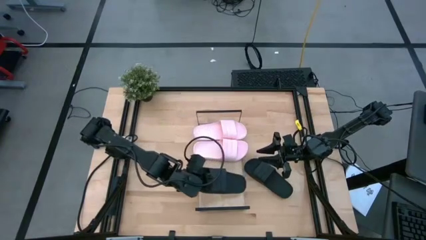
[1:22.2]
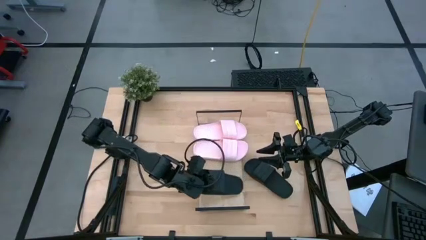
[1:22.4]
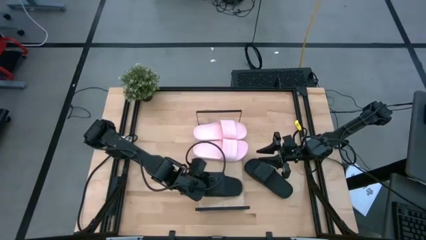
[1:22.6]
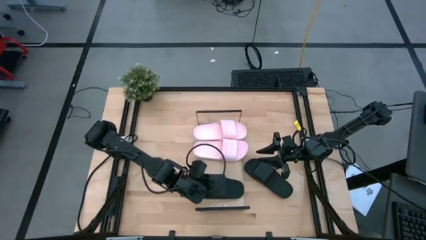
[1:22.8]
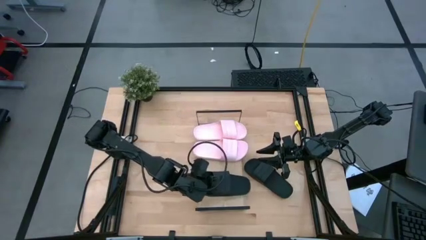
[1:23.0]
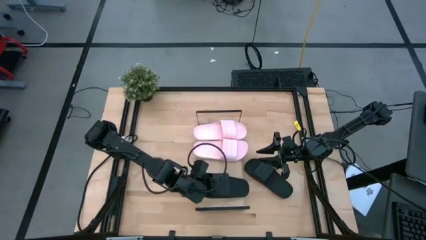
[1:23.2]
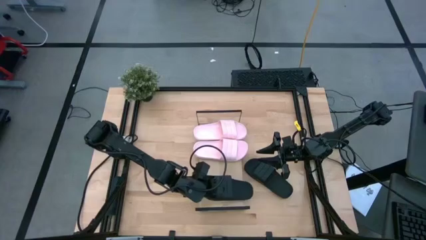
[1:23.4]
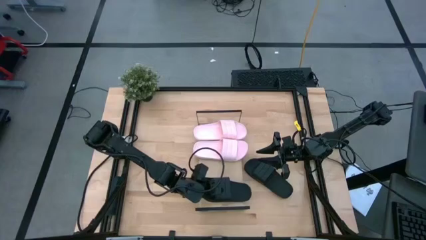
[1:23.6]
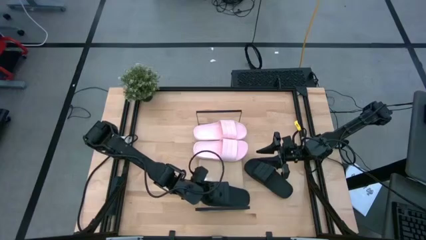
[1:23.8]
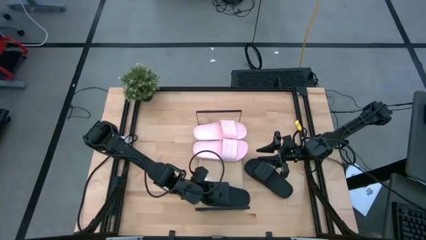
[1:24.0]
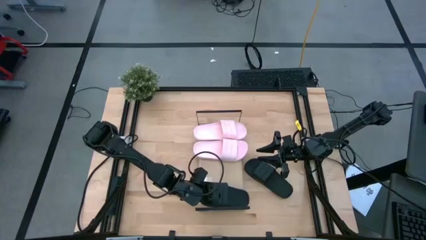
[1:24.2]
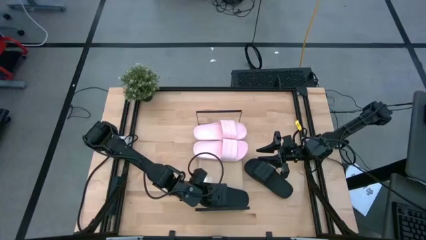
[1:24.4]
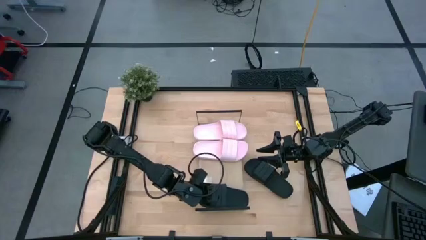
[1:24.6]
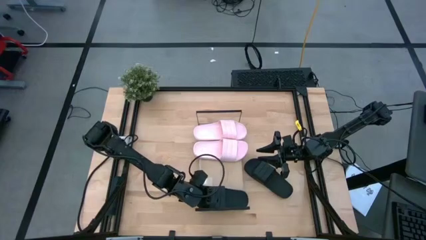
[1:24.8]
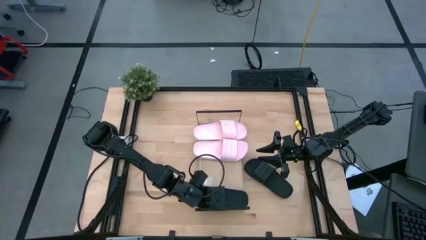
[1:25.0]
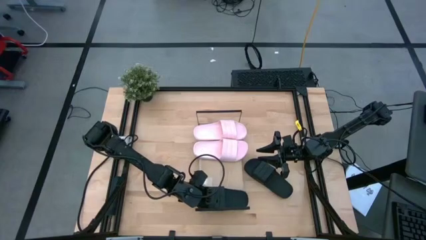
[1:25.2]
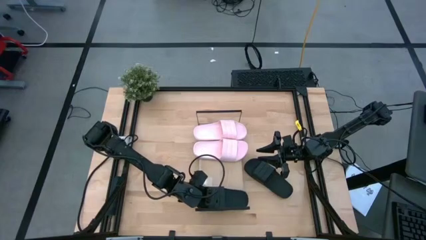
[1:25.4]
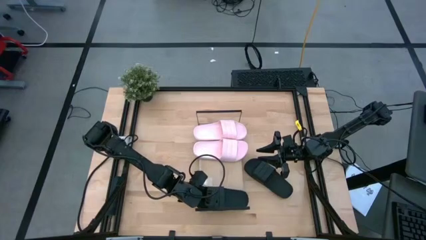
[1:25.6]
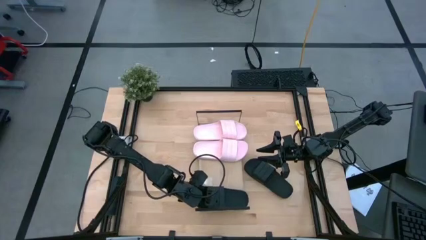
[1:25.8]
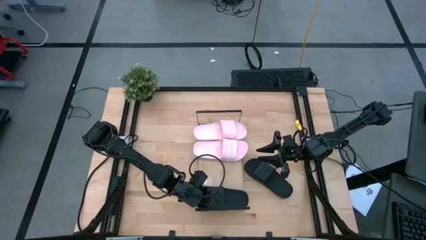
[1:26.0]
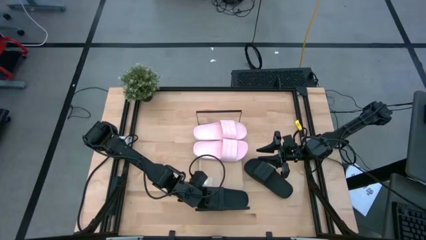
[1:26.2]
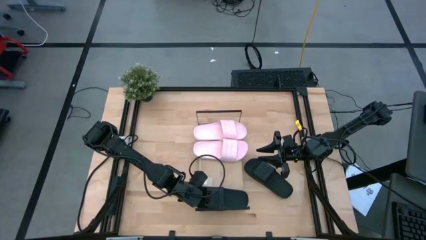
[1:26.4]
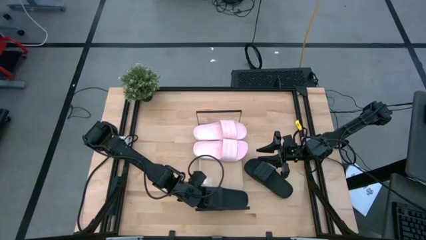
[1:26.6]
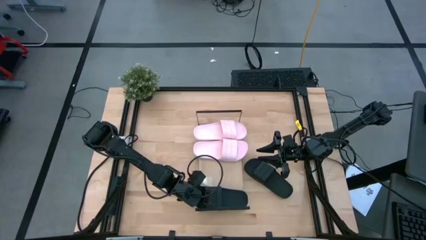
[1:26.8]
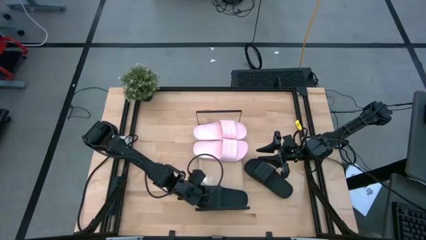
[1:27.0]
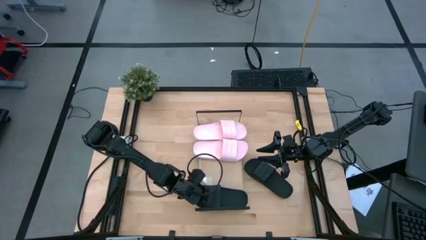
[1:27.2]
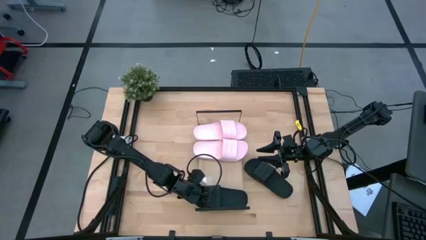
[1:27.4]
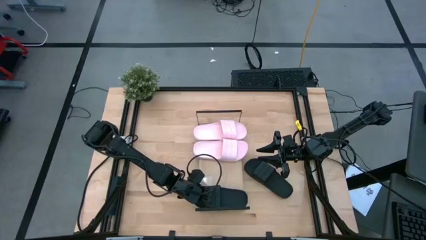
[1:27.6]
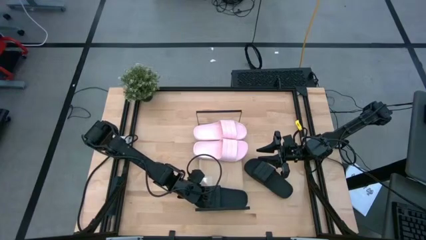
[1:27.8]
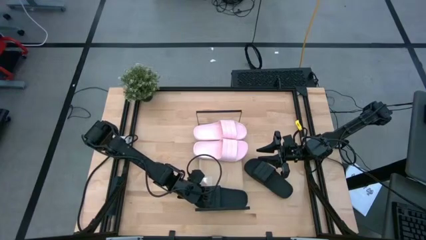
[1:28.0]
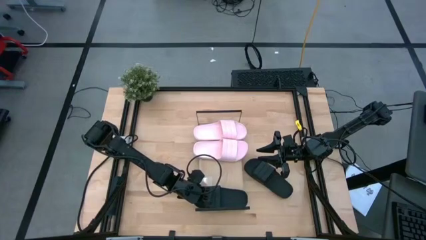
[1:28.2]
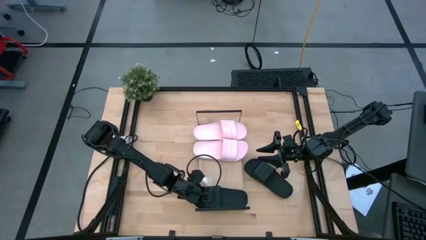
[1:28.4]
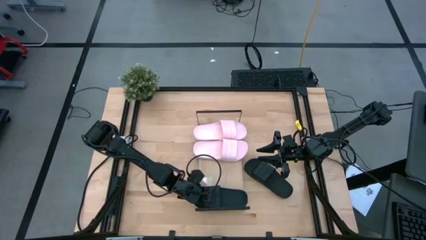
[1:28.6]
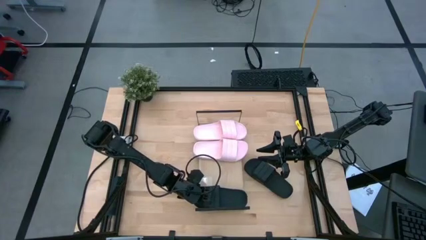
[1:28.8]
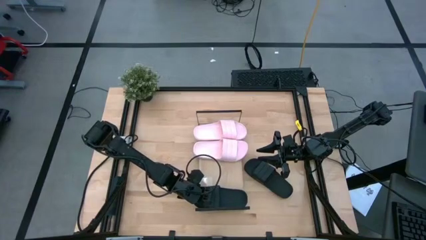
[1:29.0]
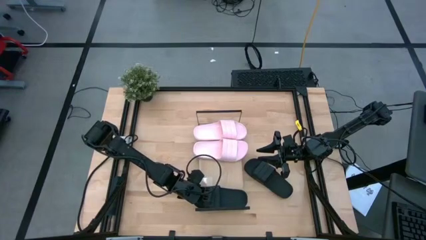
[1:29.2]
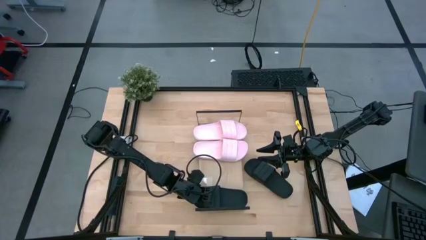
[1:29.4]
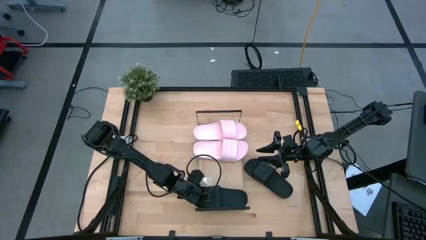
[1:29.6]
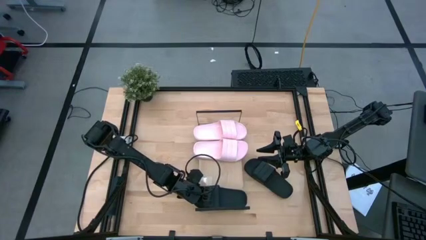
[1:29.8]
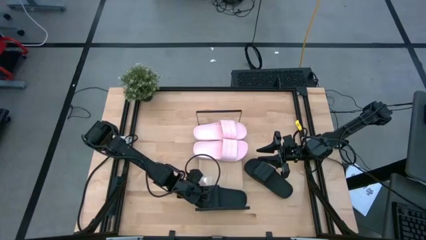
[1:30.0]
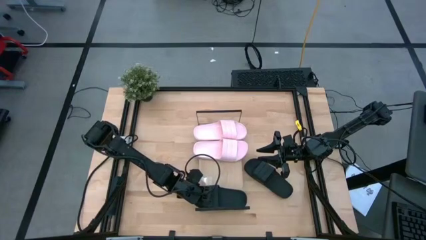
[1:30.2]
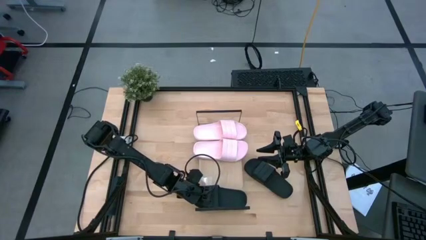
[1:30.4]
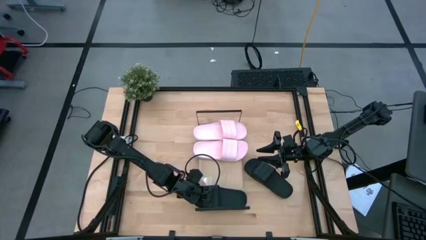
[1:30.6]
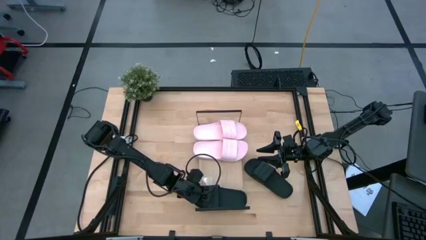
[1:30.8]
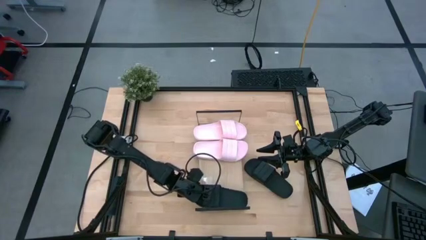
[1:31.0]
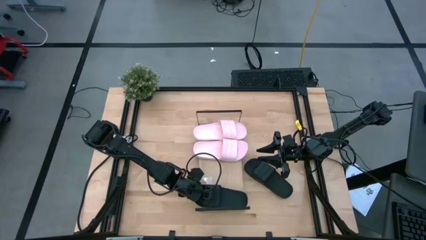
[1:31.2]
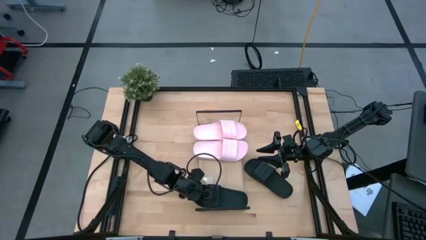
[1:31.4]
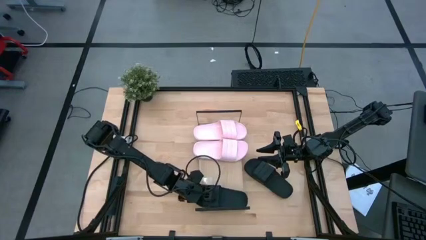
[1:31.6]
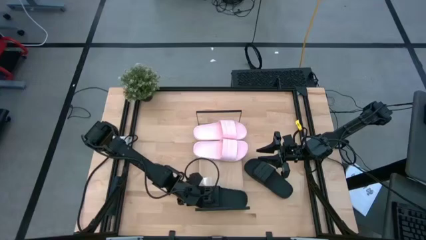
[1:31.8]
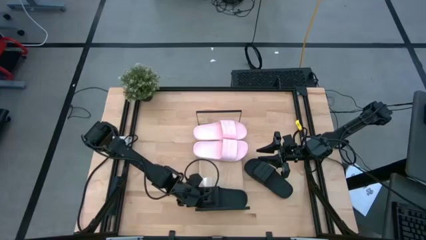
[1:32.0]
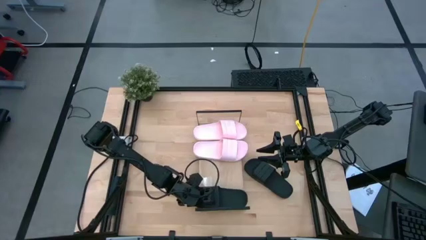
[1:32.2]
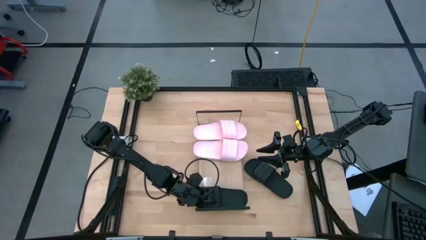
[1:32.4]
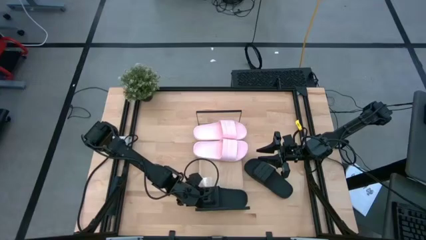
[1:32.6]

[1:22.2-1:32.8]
Task: Pick and place slides into the shelf
Put the left black slide on the shelf

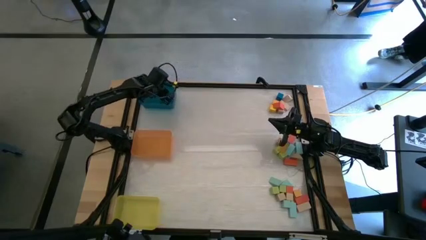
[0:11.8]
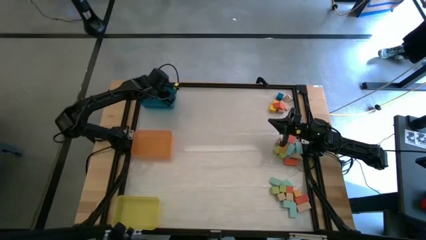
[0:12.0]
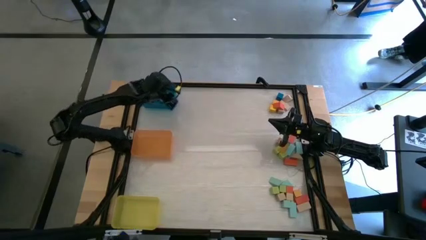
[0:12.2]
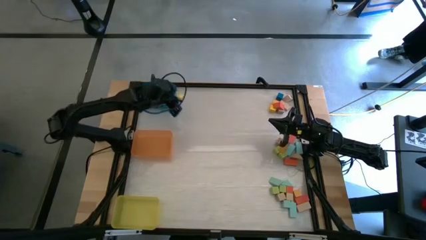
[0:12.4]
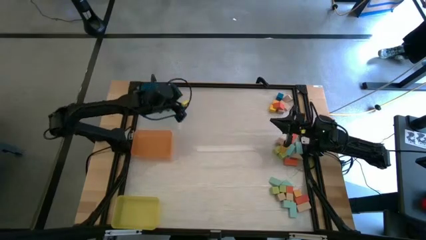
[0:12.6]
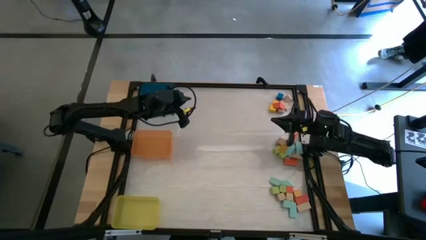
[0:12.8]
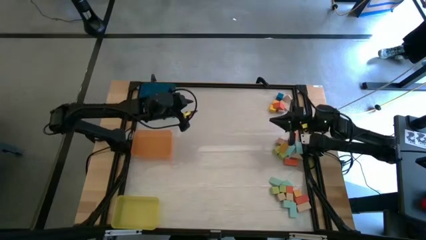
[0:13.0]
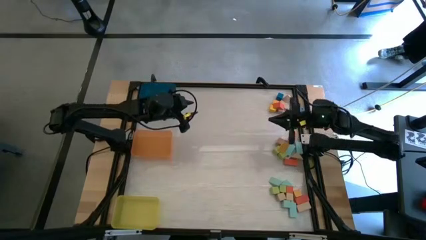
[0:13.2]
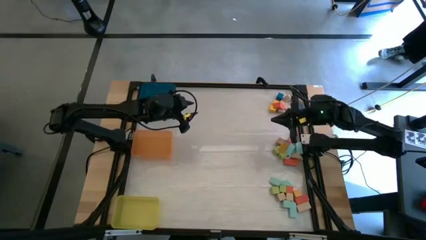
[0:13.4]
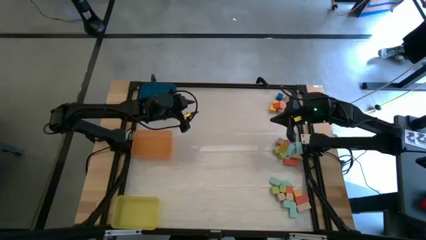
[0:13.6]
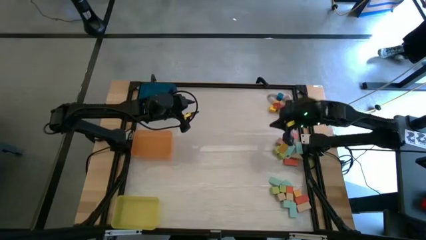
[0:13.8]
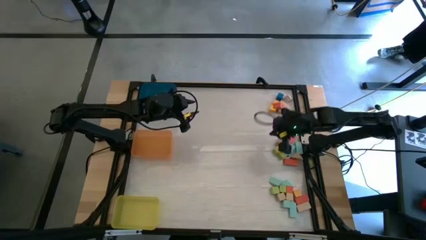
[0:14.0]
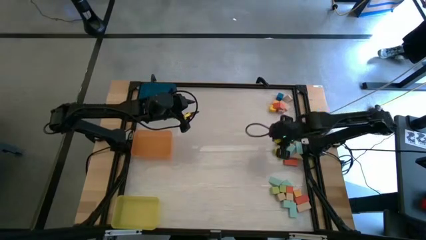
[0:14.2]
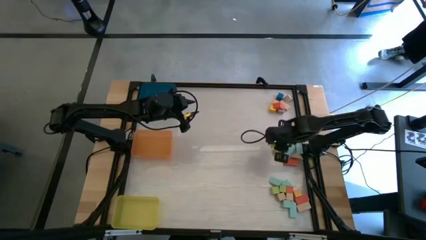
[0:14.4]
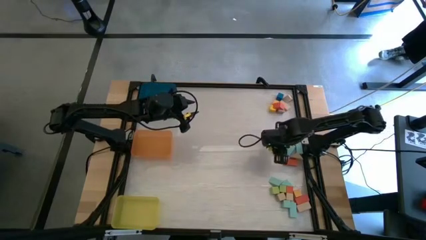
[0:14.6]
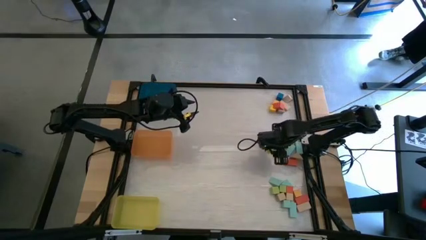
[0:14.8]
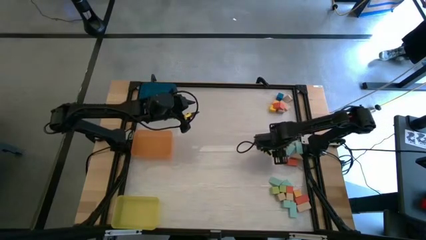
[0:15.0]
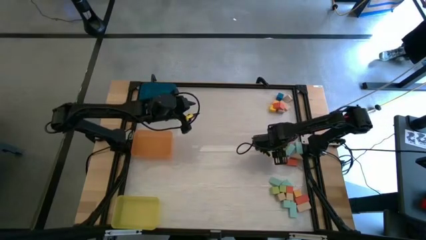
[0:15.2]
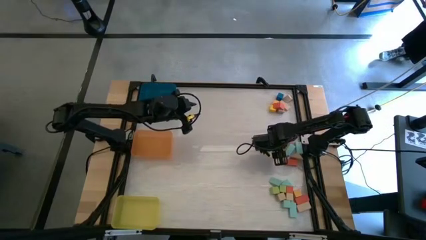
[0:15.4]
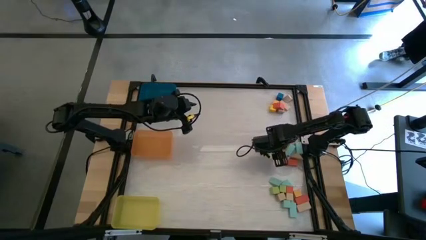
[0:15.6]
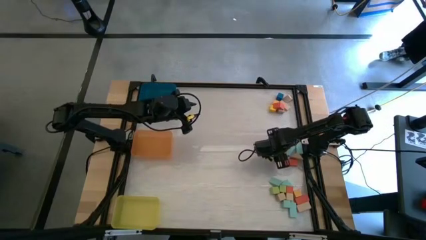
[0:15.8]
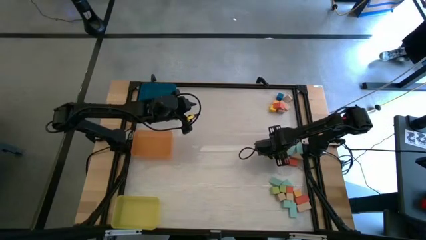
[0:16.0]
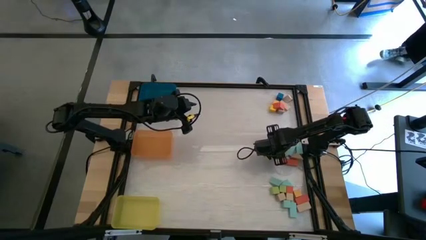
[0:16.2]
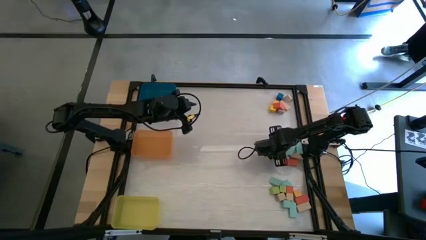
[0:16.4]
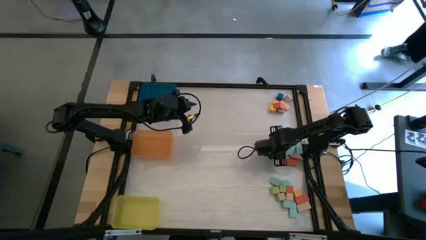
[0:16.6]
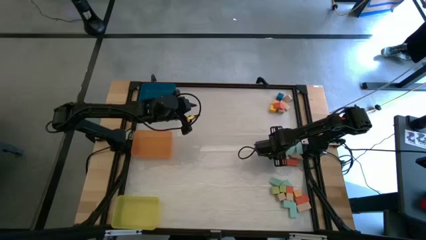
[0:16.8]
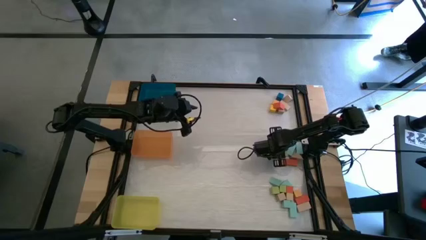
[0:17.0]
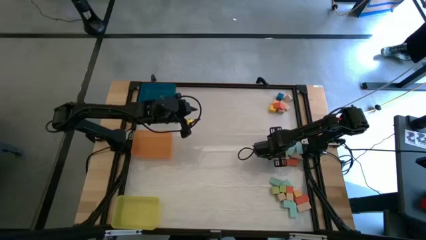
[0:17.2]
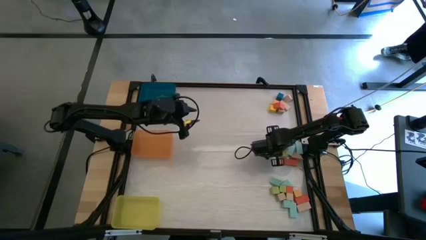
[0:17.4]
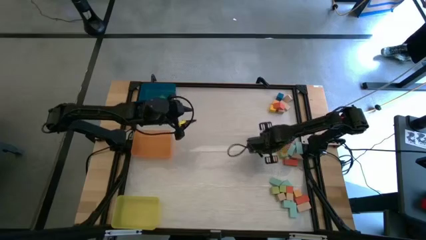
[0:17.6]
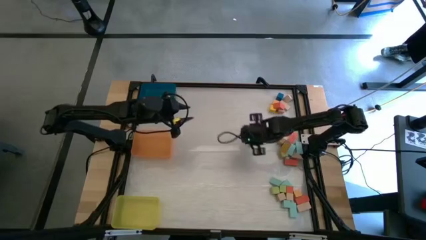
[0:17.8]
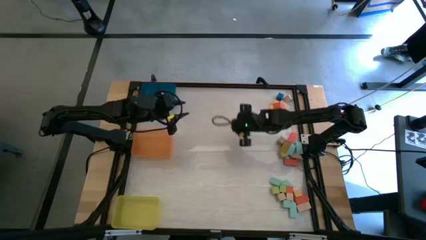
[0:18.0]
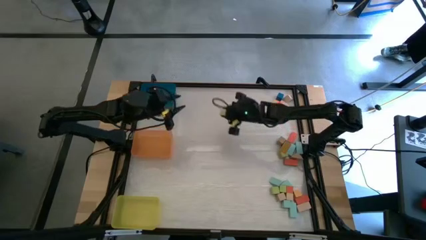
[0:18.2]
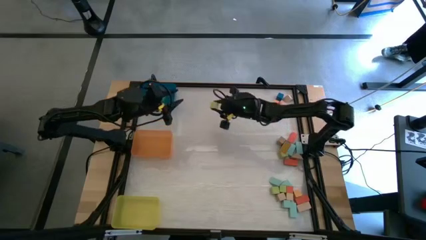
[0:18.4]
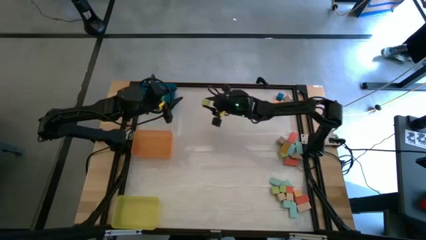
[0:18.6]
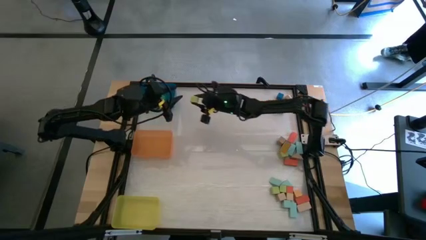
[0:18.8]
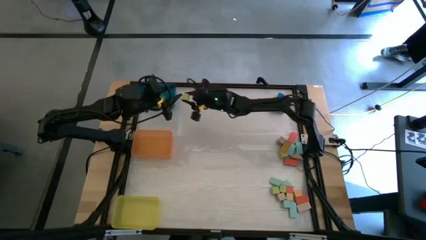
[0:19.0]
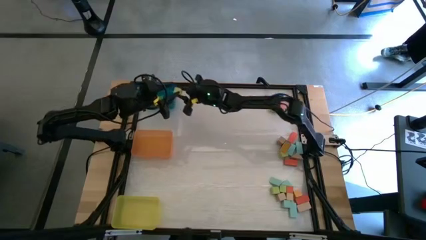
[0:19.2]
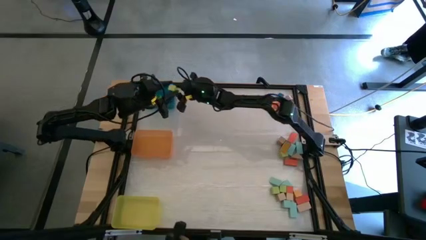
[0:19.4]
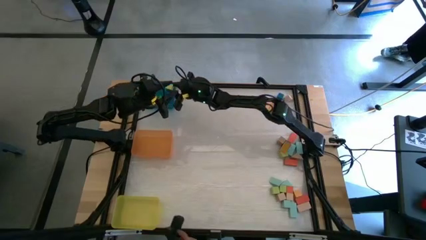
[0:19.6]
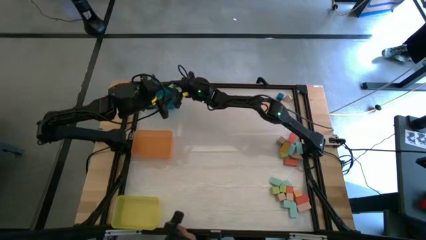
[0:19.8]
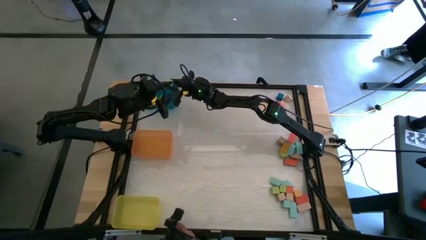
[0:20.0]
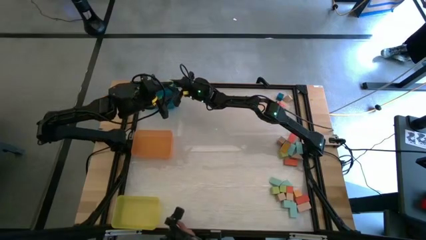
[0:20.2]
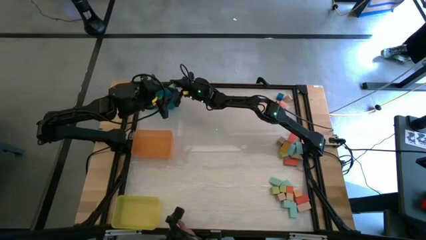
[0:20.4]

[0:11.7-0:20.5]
Task: Sort blocks by size
Put the light green cube block into the blue bin
